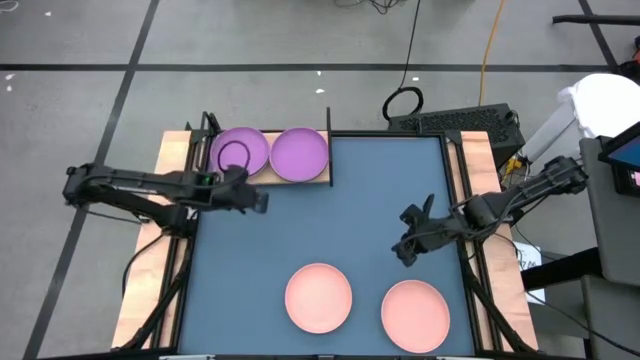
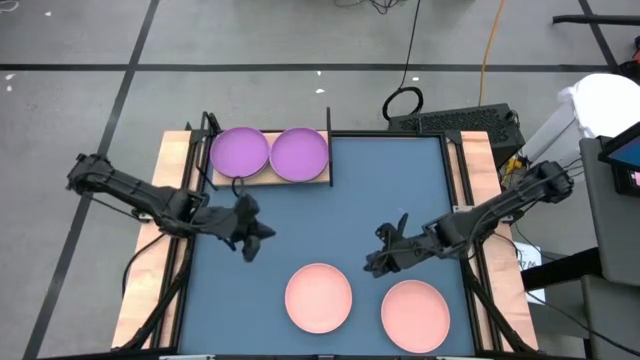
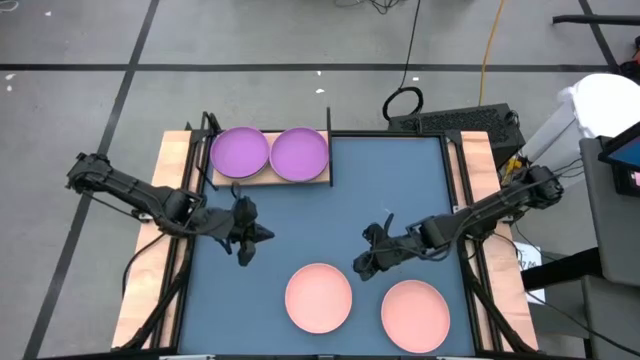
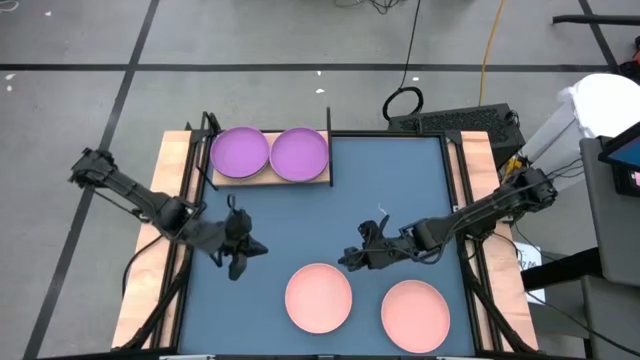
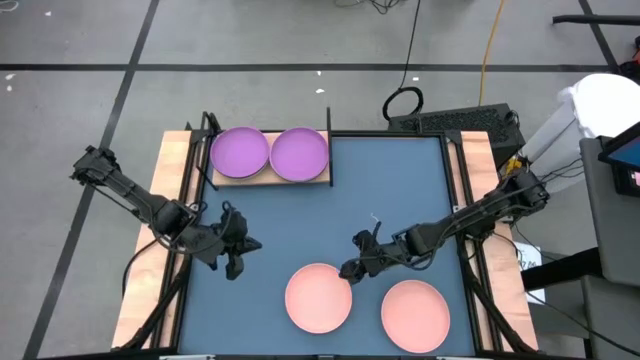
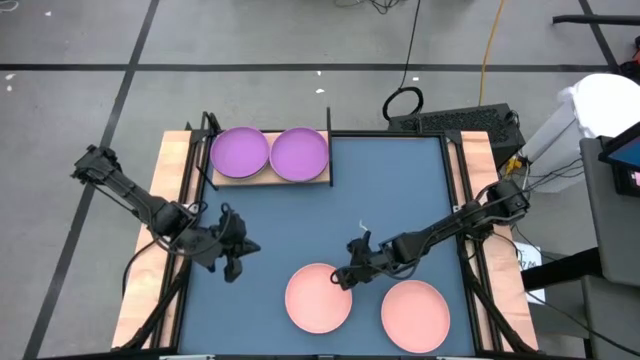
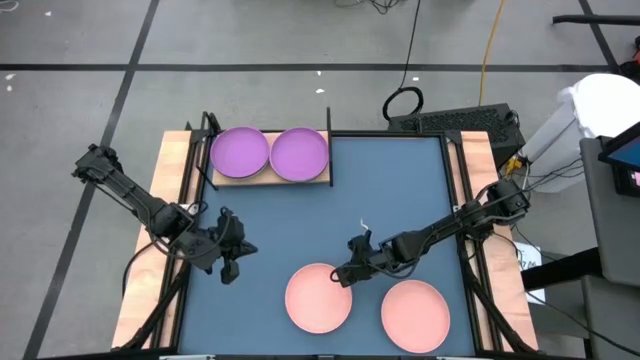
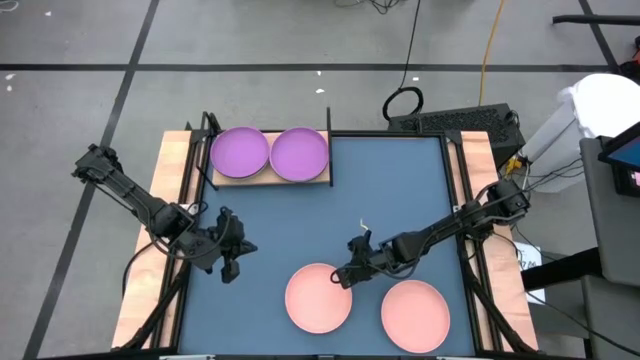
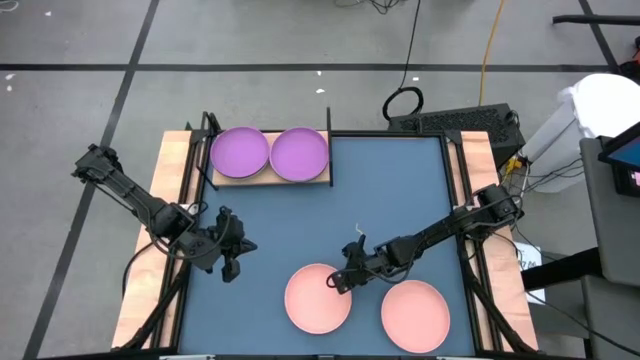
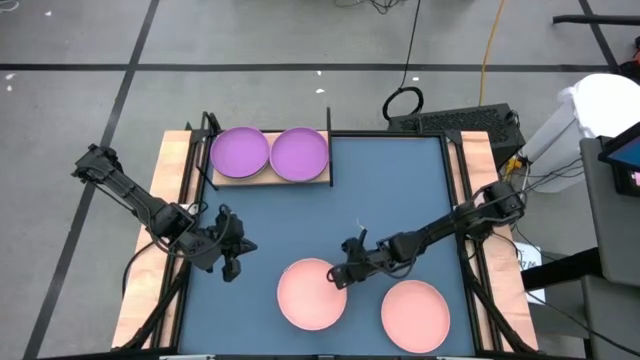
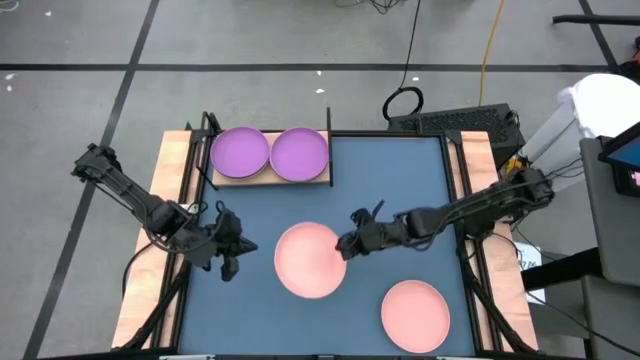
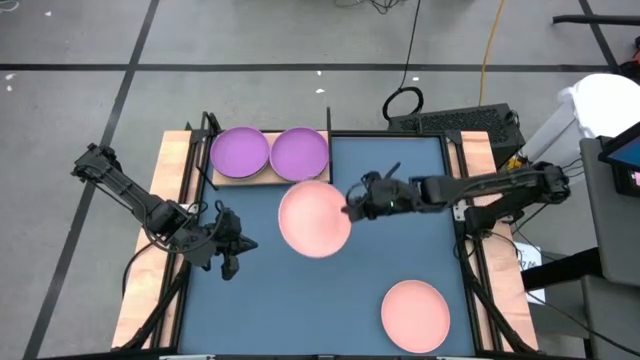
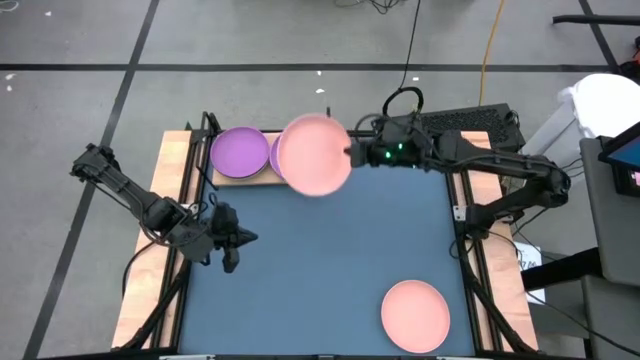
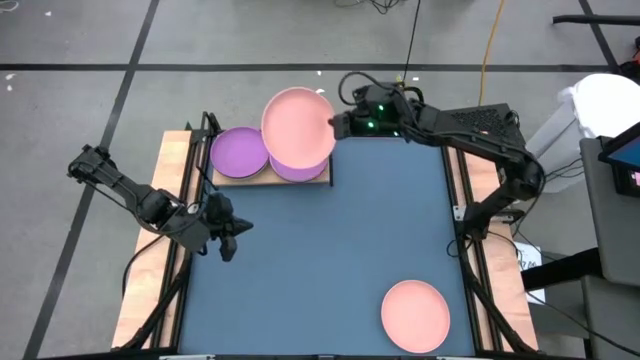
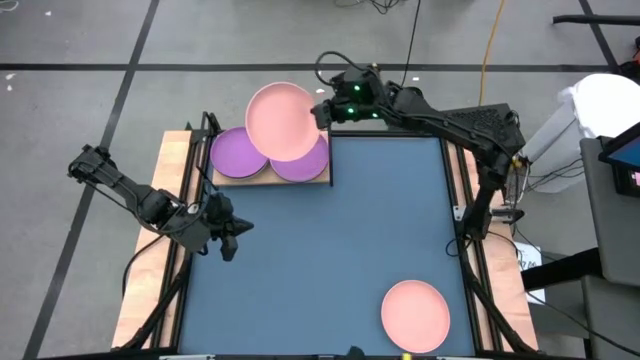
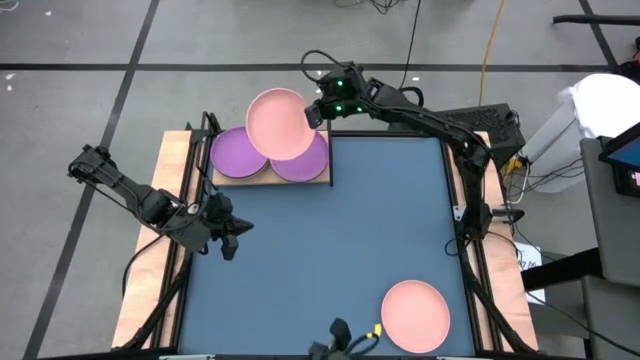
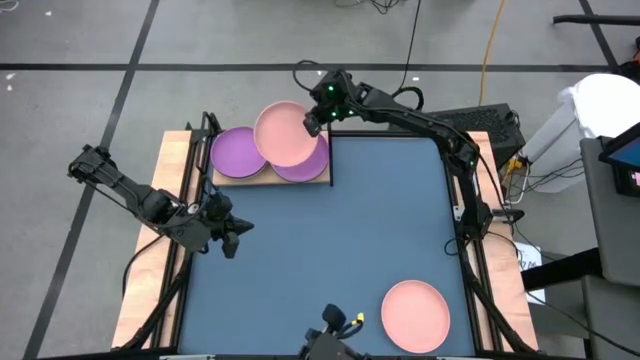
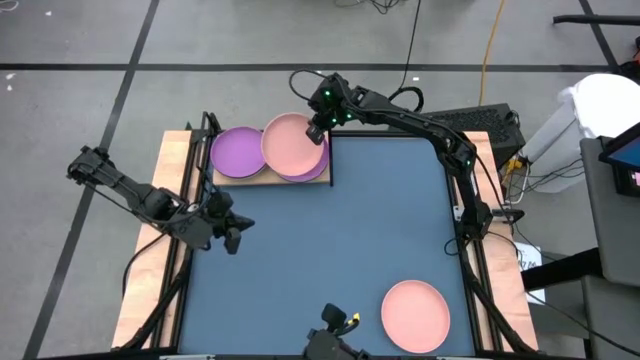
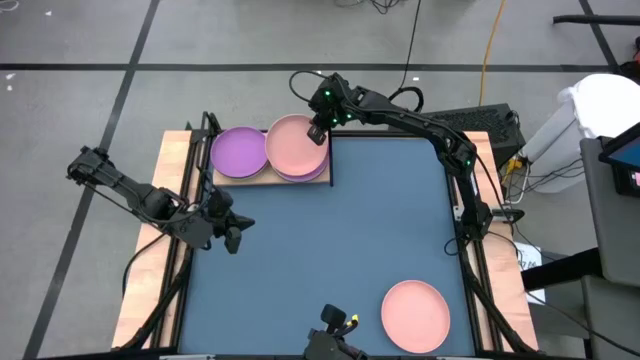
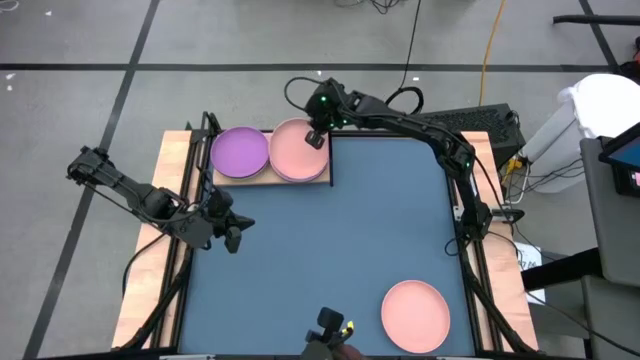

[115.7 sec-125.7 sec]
Task: Place and stack plates onto a shelf
Stack the left light orange plate on top of the right violet plate on the shelf

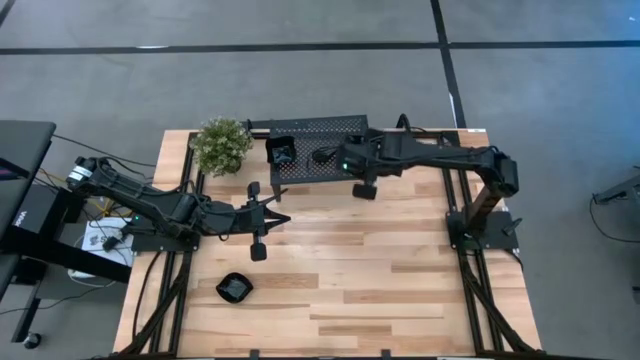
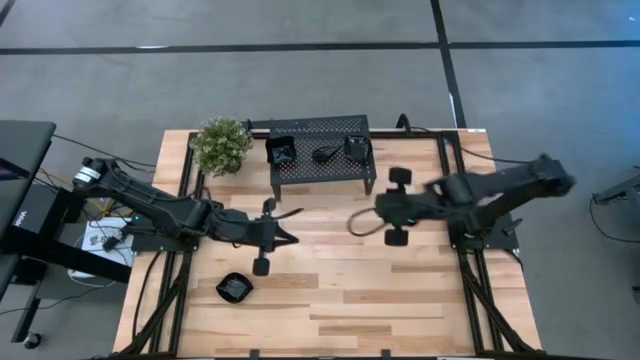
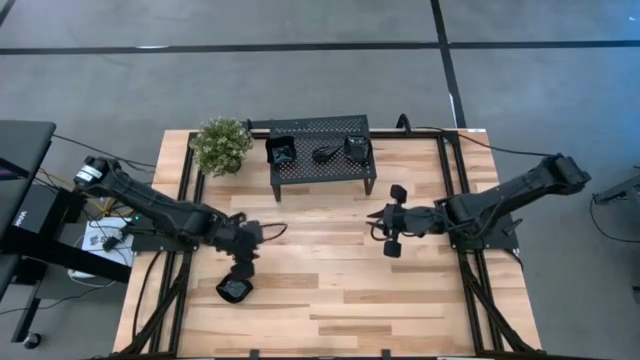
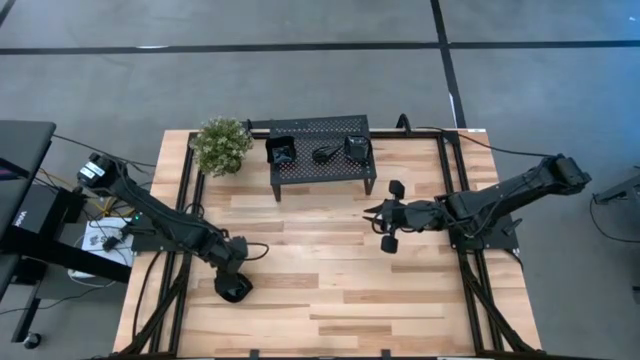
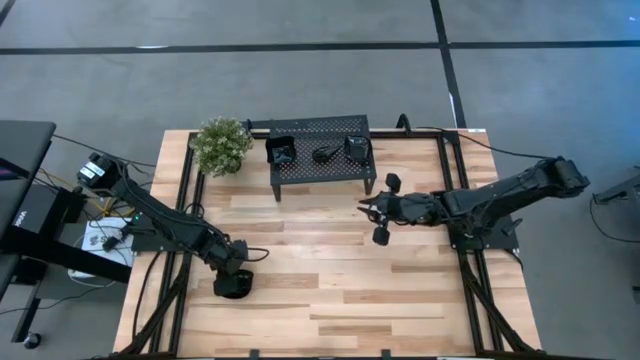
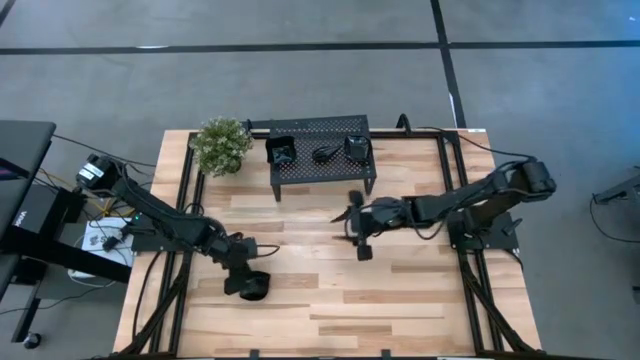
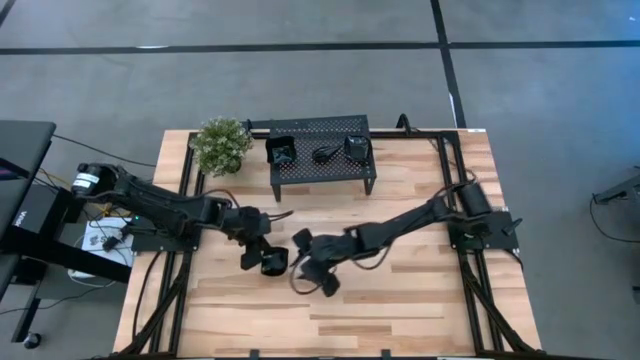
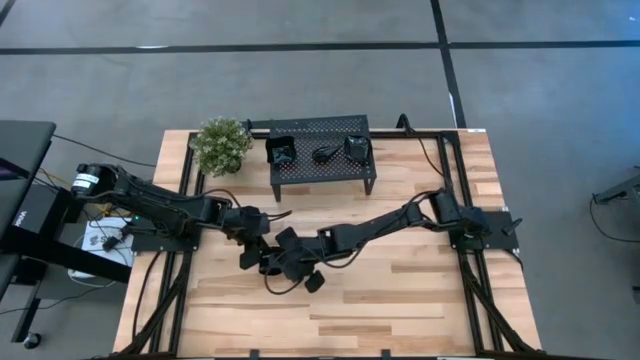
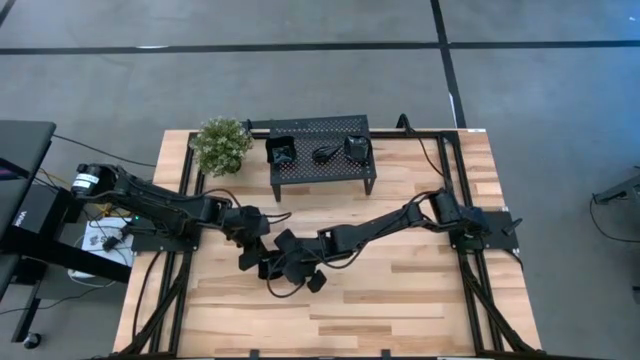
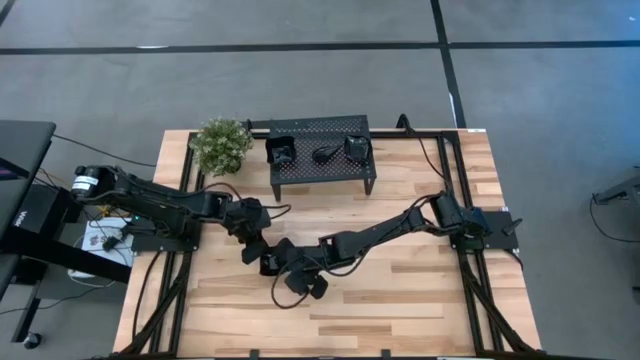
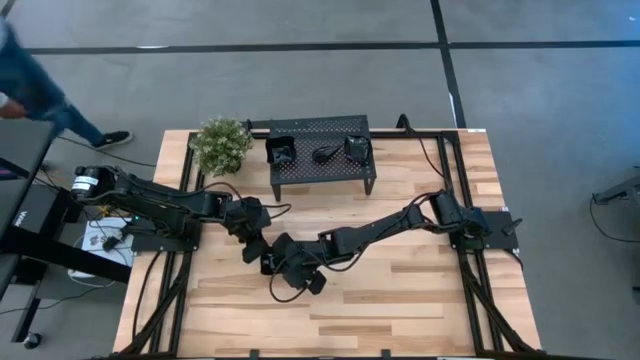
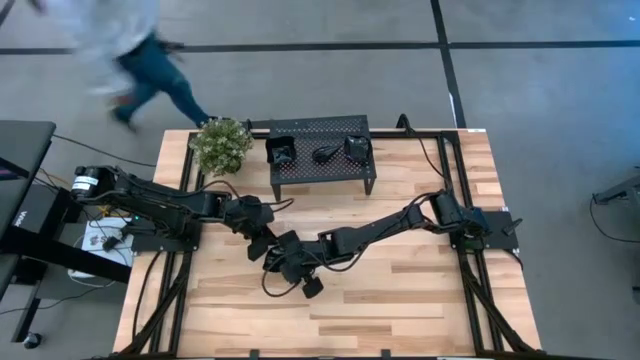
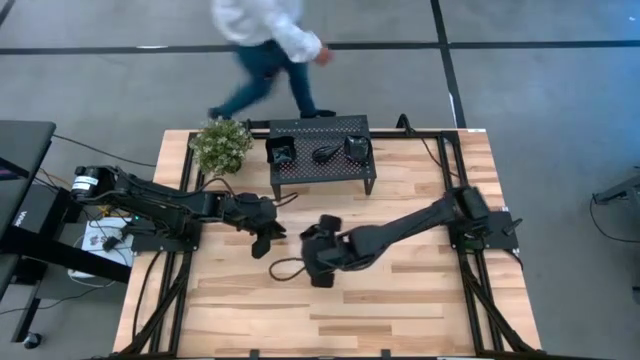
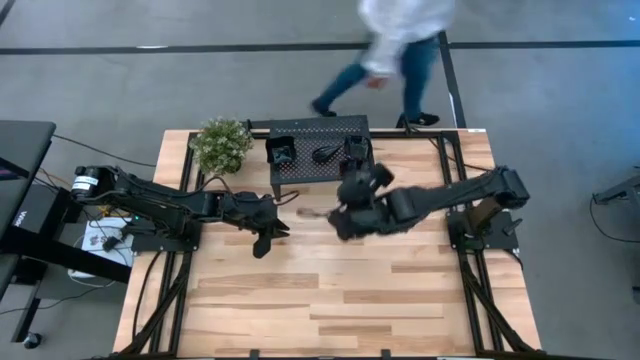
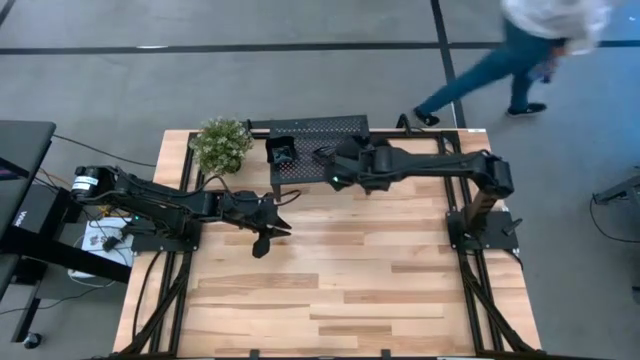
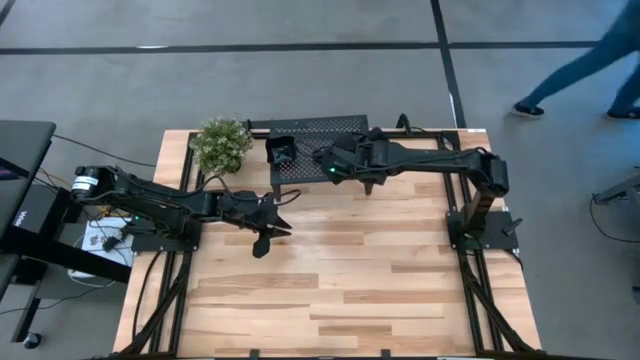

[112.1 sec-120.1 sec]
Task: Pick & Place Mini shaped plates
Stack the leaf shaped plate on top of the leaf shaped plates on the shelf
